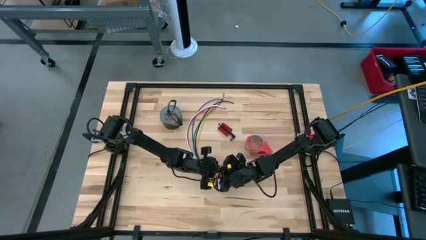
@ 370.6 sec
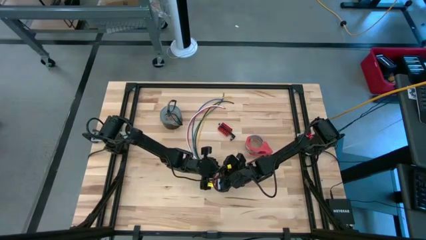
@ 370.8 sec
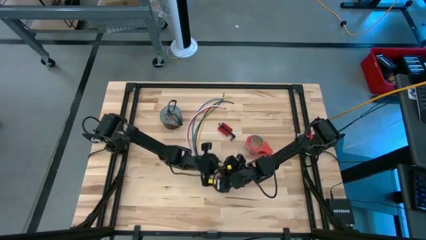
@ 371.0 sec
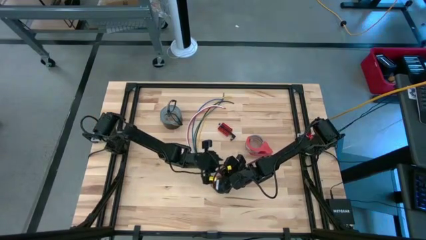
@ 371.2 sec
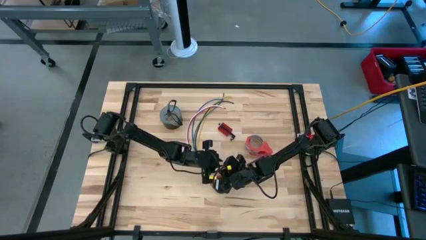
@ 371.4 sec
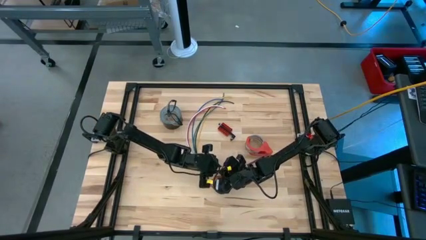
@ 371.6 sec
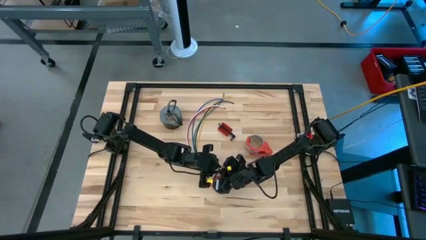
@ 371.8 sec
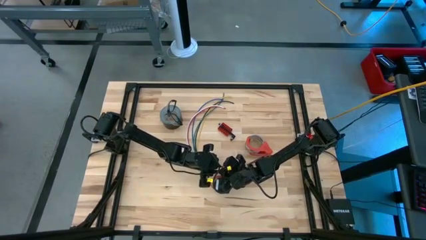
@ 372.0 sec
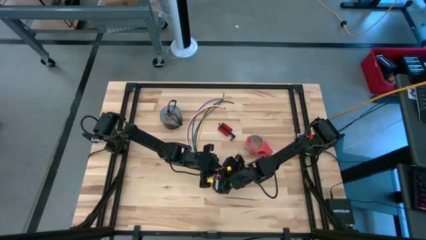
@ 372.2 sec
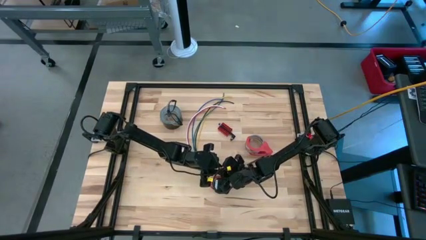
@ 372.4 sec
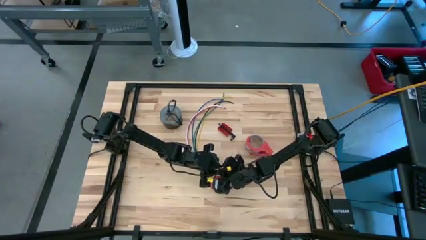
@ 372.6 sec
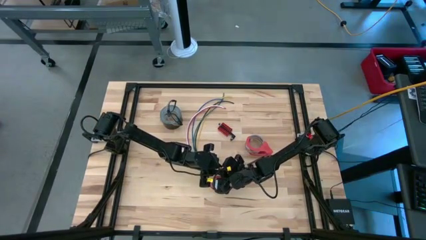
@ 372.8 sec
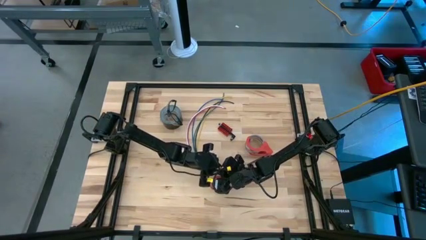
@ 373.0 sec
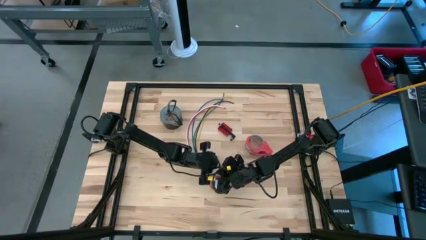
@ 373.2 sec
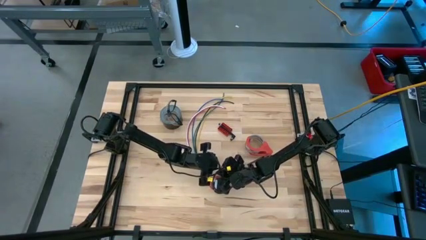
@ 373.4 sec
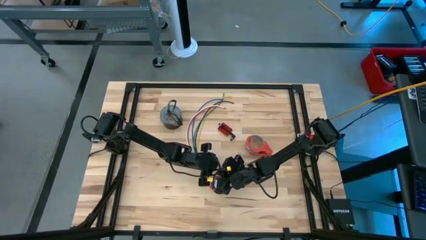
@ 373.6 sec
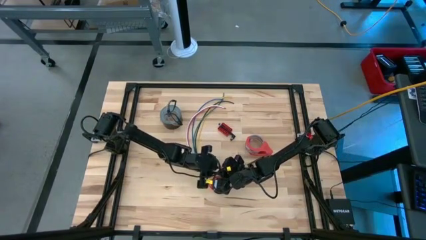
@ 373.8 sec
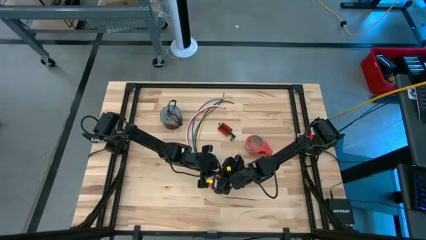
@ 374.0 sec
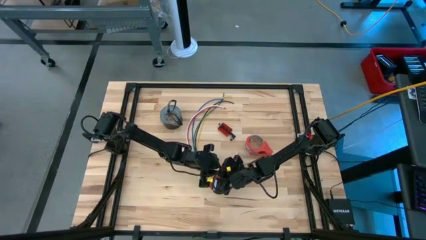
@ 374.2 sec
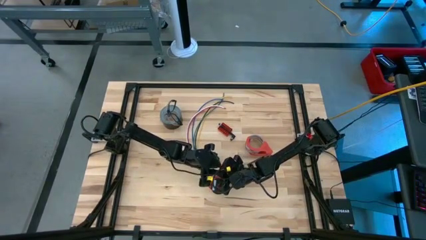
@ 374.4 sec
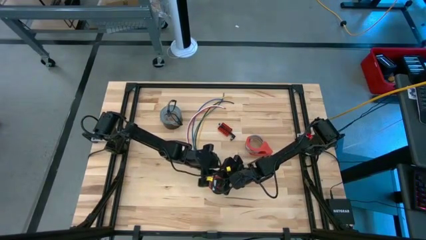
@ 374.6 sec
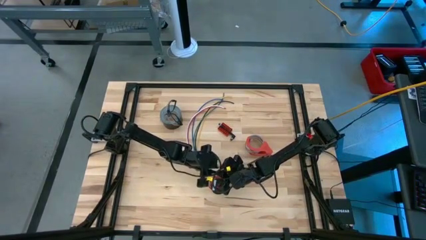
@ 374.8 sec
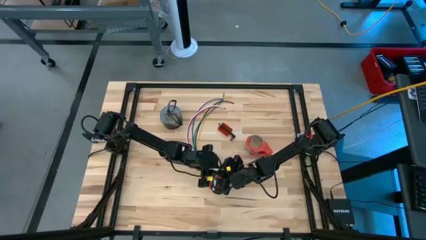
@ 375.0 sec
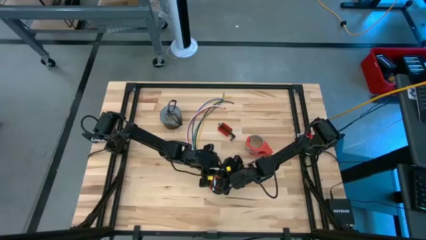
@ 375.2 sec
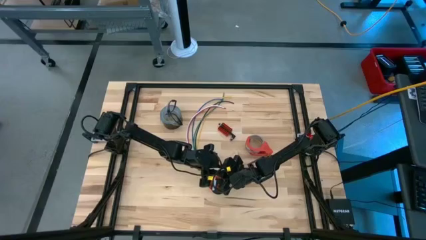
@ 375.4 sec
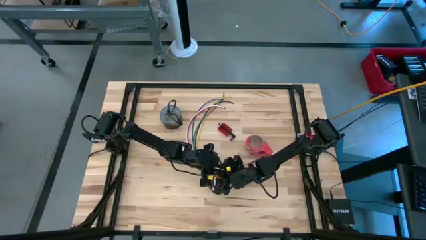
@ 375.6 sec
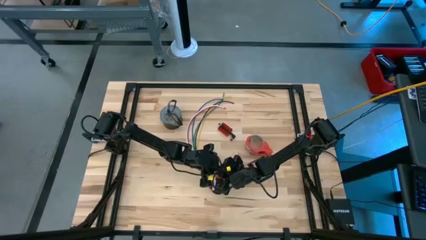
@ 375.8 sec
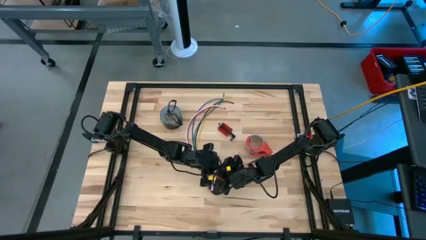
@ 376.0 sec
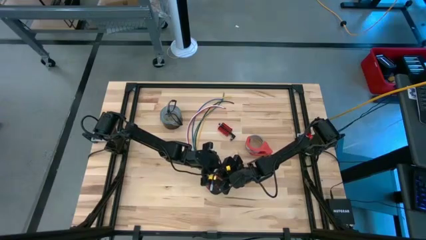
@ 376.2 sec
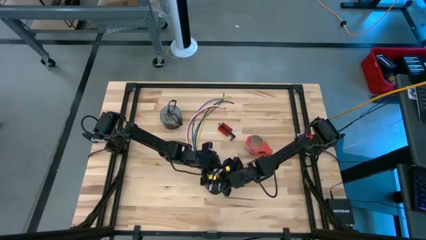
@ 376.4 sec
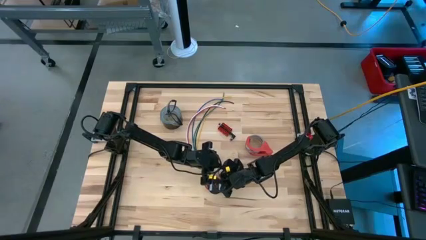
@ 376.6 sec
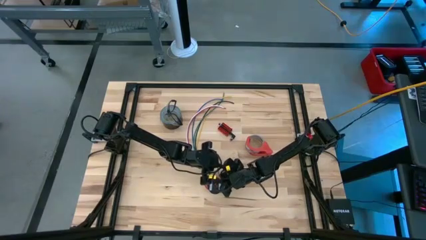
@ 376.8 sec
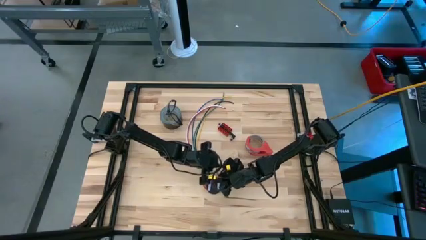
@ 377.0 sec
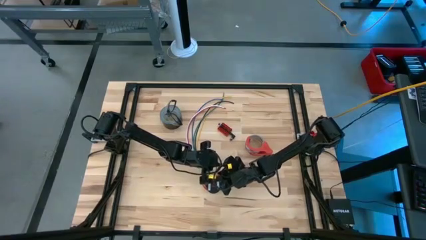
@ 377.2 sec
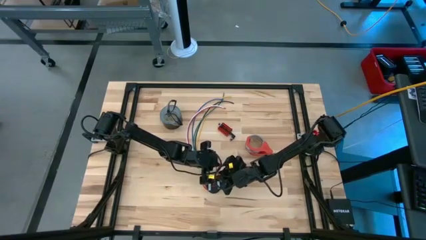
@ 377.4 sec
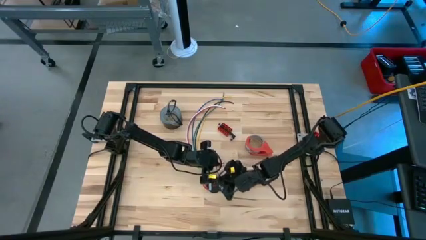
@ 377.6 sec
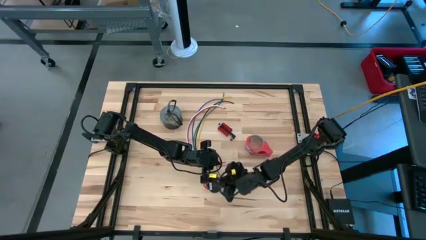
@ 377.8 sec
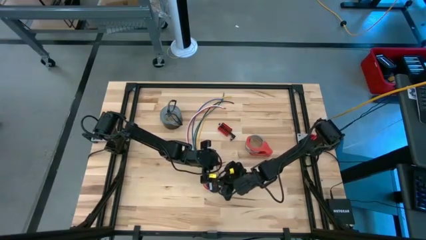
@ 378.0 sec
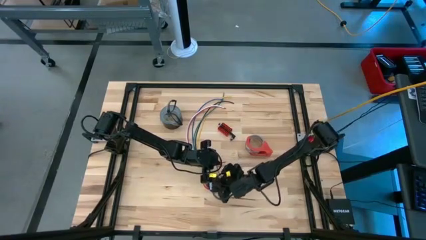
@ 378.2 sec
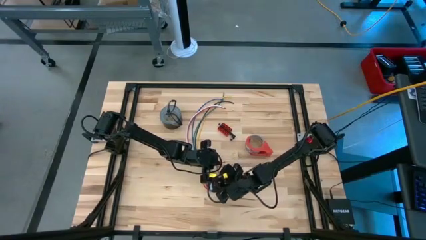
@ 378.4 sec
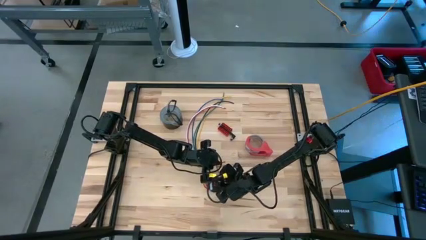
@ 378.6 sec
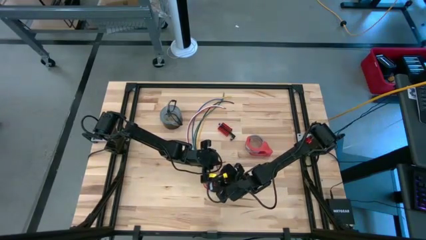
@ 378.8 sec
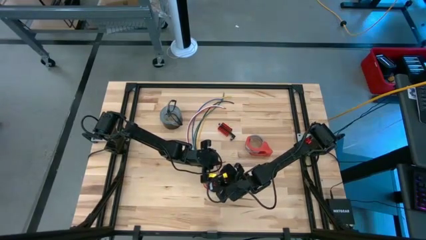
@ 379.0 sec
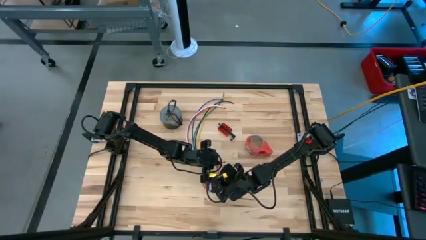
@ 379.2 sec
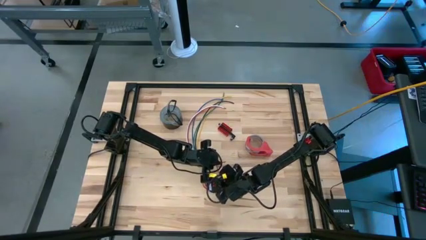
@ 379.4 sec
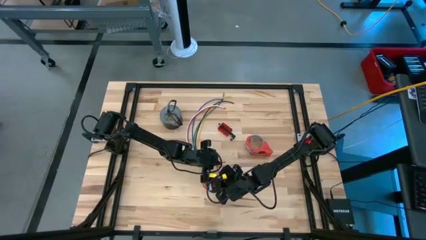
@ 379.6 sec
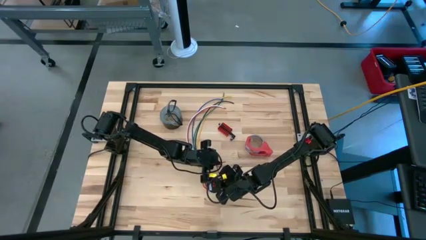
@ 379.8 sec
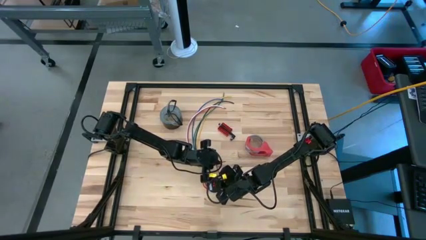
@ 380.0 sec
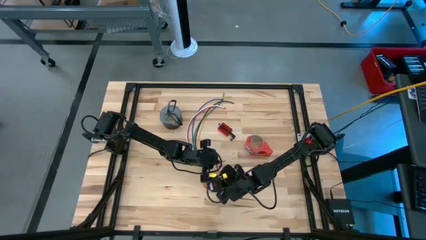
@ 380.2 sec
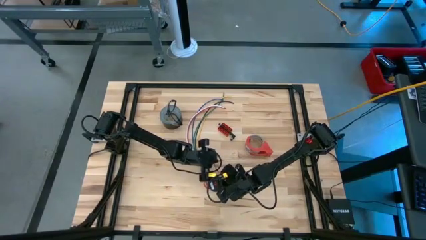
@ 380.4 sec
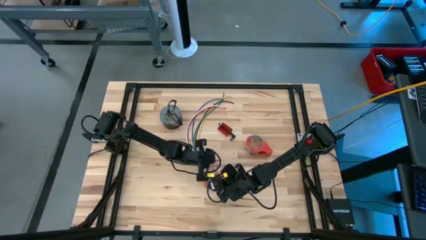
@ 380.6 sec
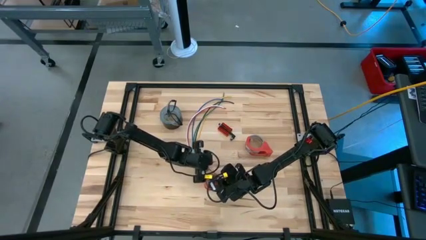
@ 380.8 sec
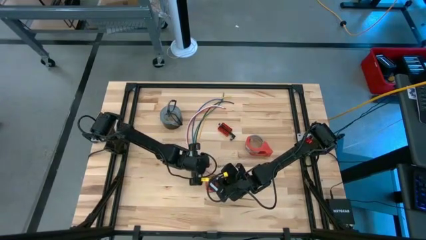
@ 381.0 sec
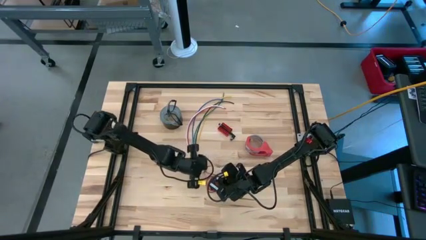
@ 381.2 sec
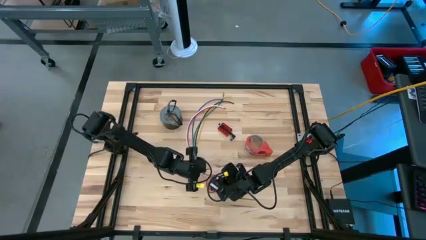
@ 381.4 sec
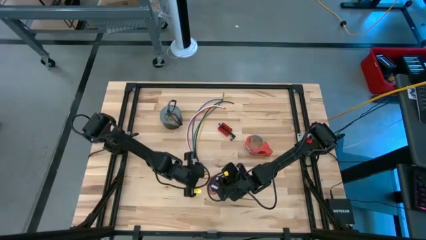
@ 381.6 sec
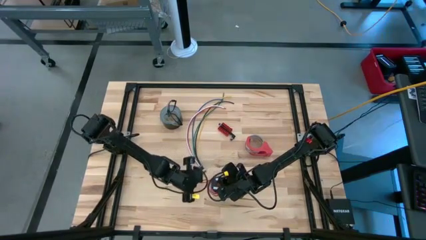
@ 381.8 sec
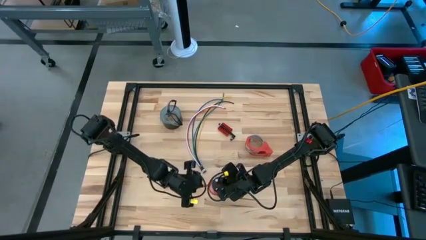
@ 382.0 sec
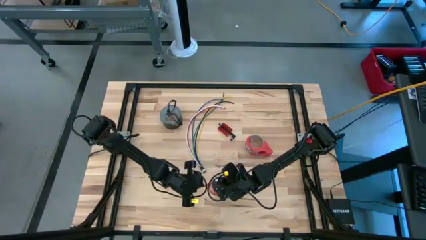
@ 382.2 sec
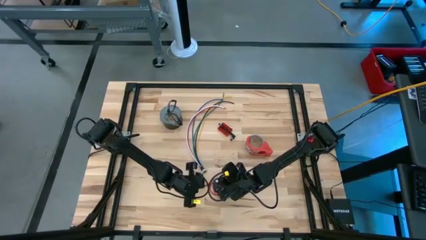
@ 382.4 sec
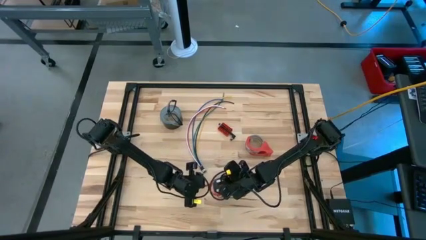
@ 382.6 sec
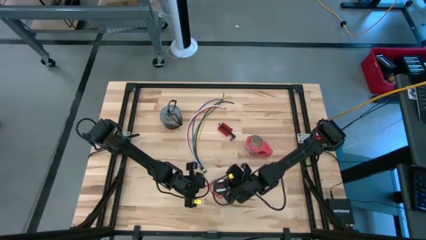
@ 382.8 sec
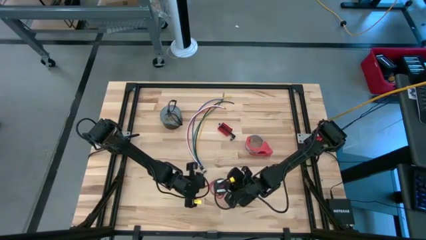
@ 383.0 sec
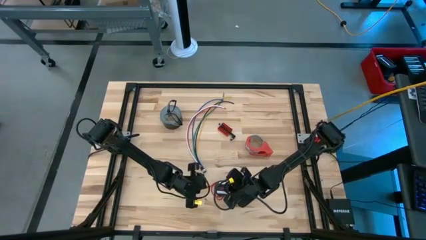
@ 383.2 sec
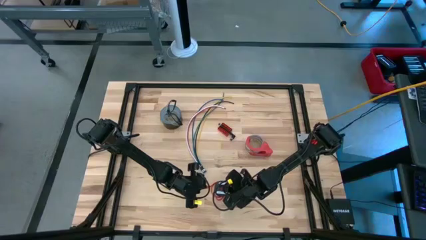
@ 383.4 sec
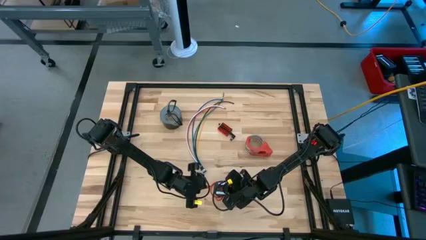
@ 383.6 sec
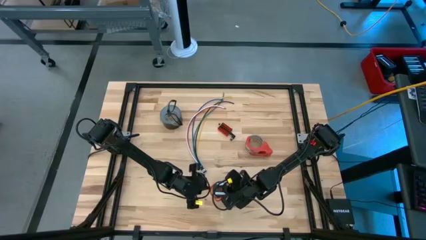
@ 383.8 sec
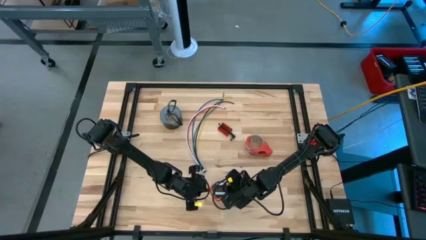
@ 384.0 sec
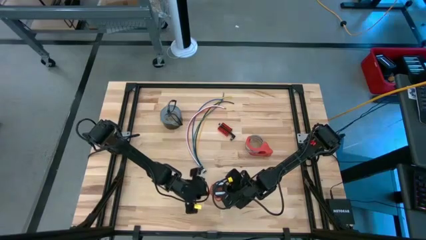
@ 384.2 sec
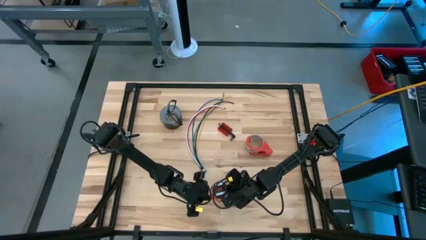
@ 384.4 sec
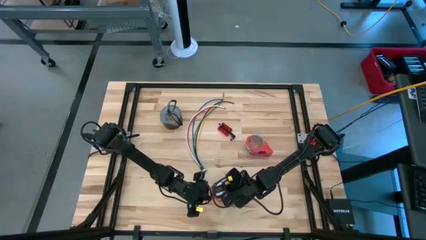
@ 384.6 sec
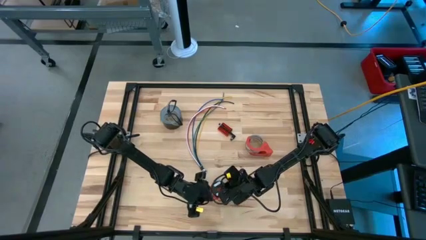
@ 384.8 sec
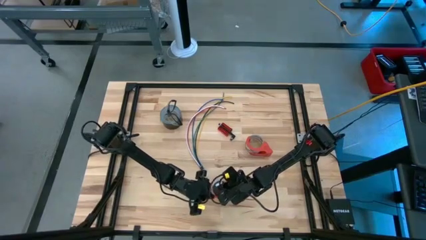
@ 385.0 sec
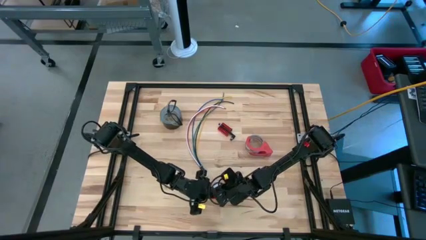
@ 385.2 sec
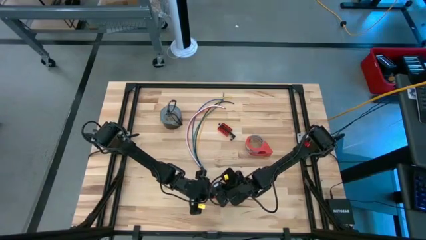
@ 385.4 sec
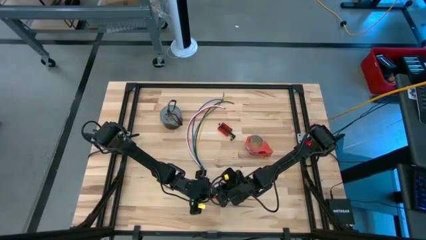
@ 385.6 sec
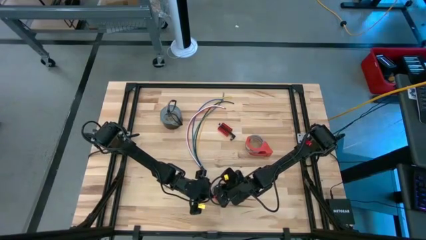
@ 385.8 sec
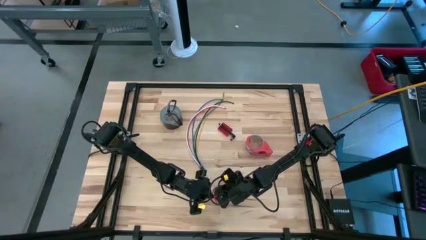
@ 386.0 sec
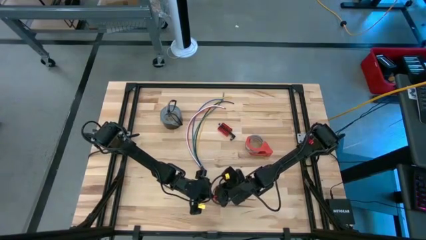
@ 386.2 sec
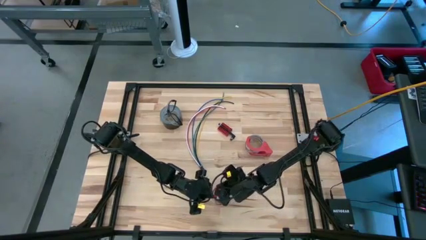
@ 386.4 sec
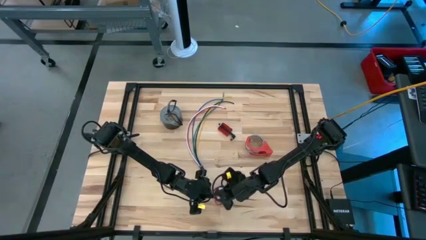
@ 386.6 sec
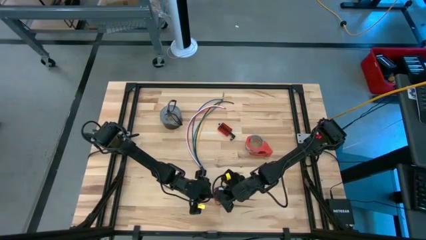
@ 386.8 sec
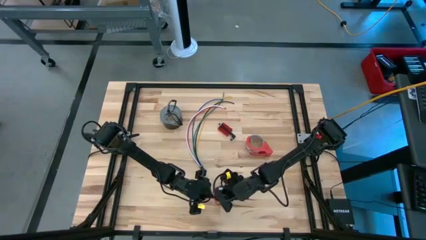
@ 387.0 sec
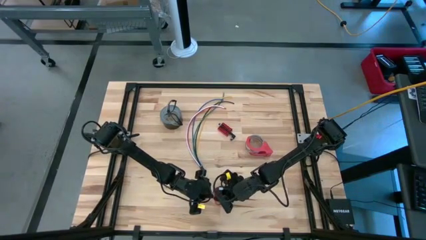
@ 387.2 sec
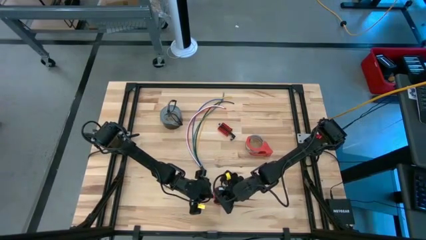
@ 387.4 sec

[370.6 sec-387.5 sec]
Task: Coil cords
Coil the red wire onto the spool
